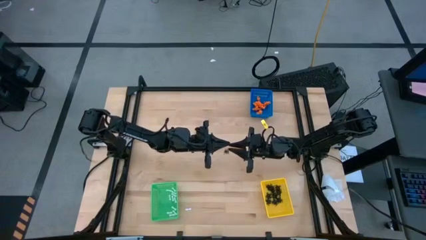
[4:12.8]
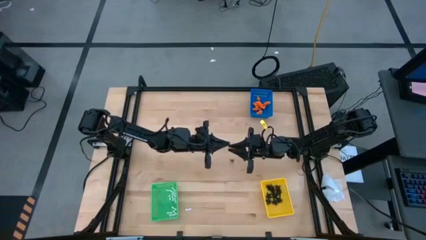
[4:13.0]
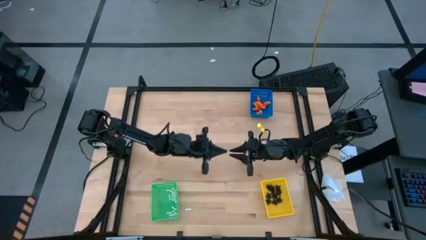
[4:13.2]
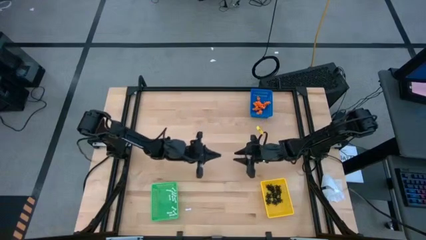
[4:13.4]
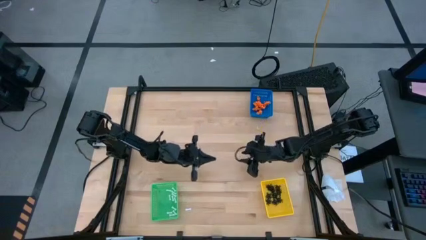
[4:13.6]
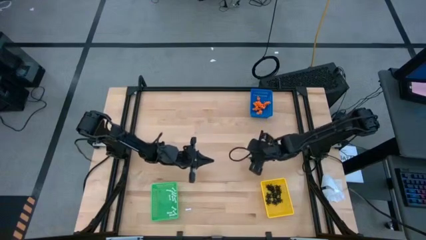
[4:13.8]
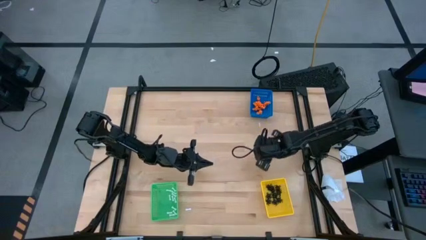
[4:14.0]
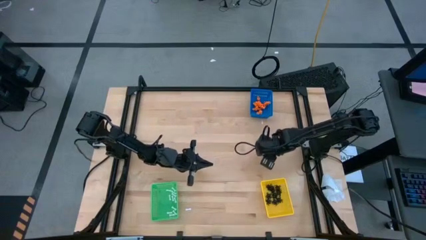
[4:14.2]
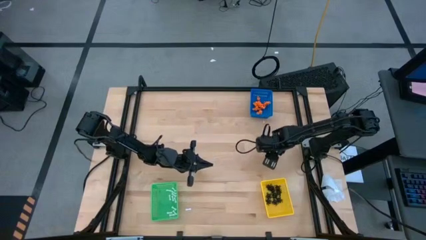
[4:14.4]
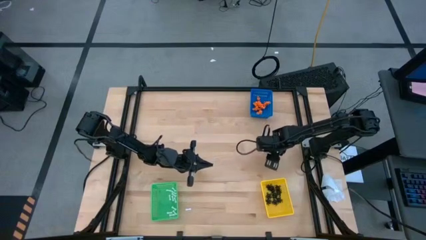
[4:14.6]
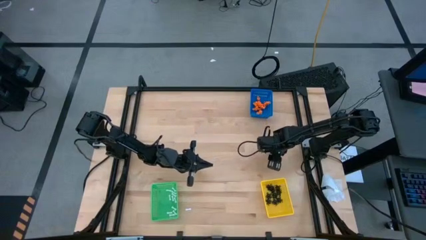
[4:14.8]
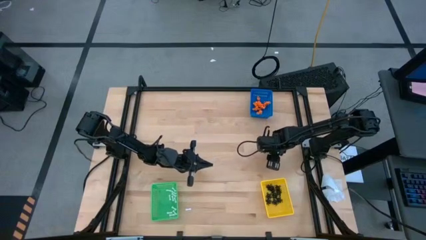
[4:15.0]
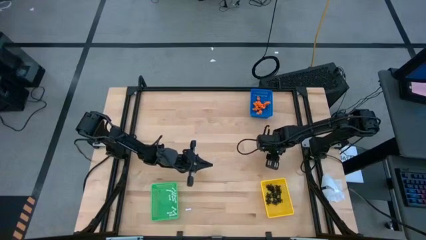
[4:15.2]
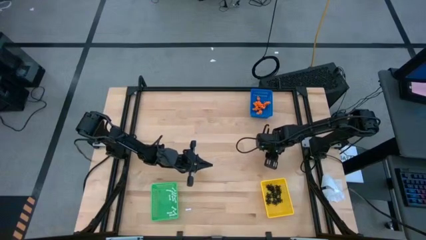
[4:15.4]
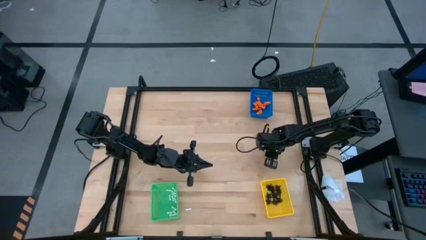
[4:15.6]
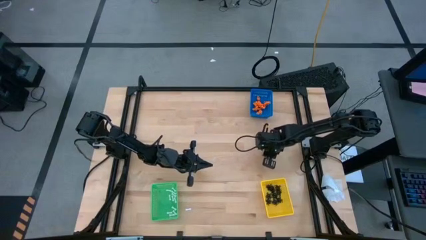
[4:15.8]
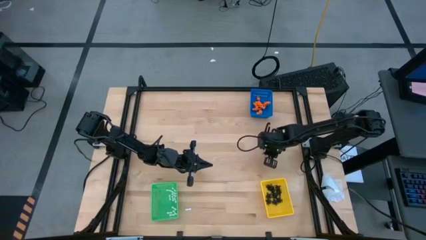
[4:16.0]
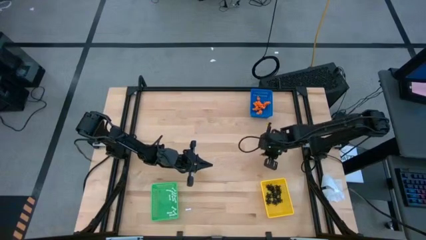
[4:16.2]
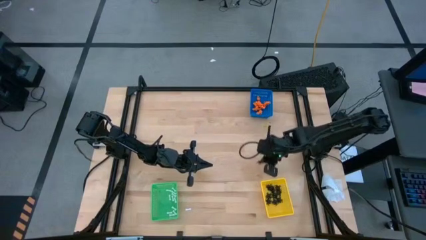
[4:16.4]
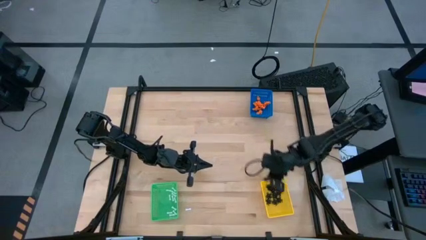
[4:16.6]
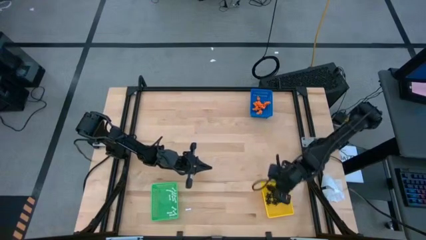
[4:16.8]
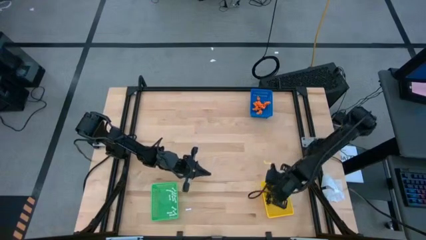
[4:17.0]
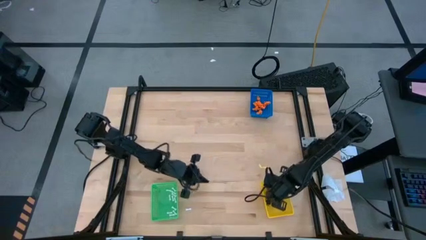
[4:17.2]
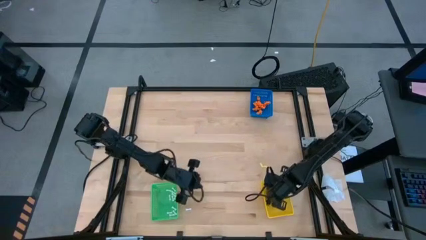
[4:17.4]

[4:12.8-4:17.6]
Task: Sort Halloween decoration
Put the black spider toy into the yellow bin

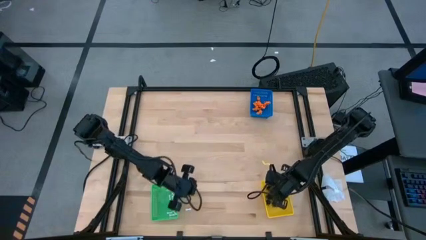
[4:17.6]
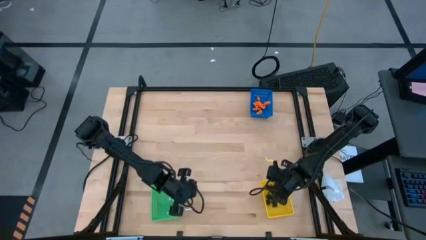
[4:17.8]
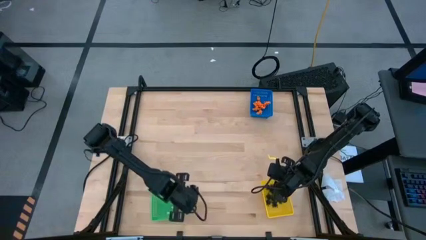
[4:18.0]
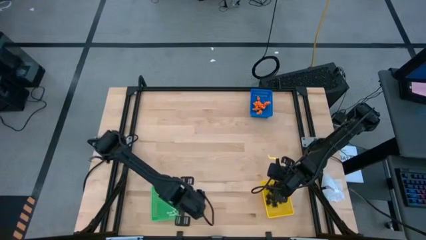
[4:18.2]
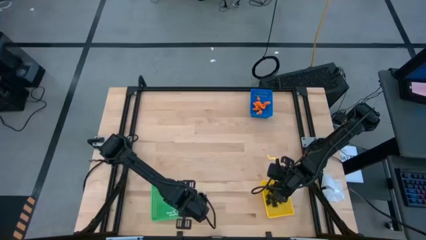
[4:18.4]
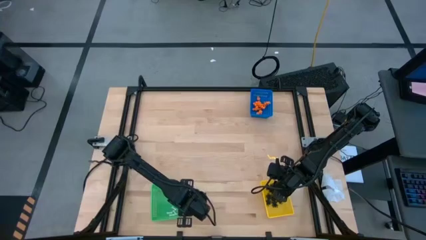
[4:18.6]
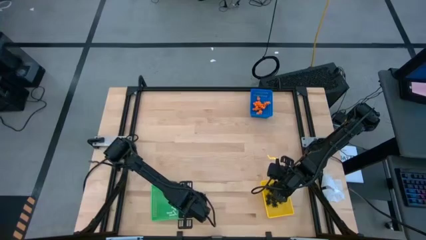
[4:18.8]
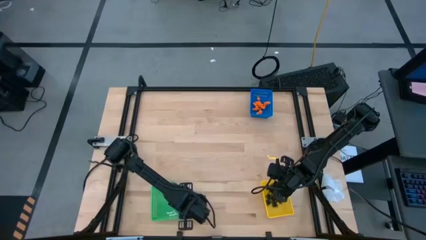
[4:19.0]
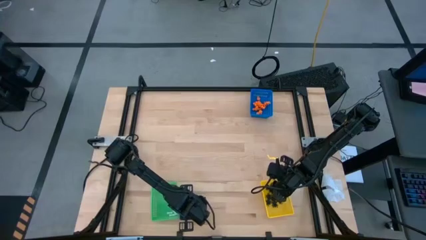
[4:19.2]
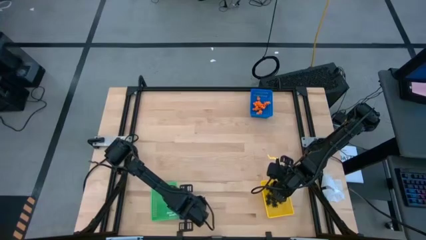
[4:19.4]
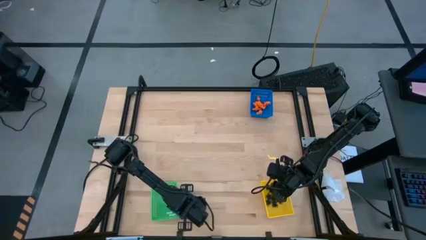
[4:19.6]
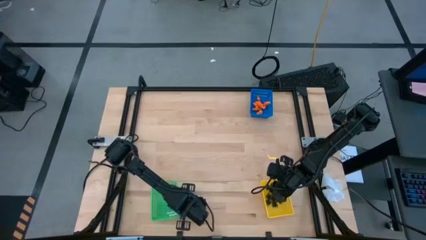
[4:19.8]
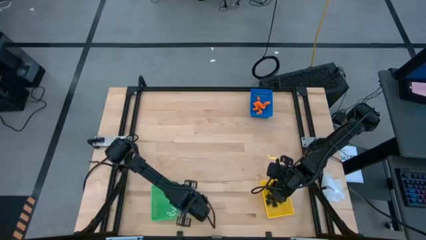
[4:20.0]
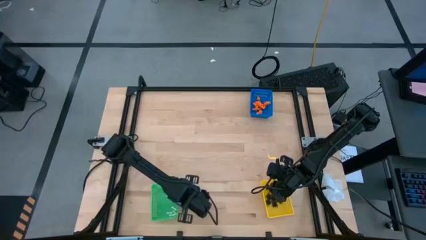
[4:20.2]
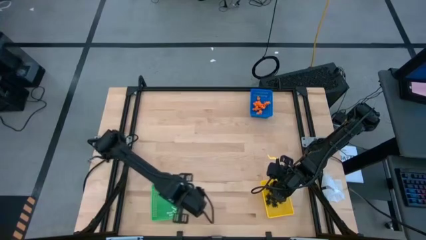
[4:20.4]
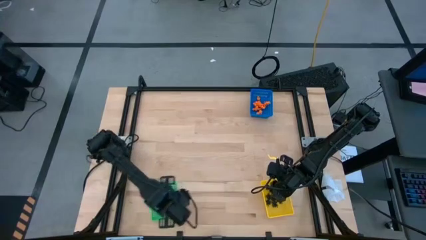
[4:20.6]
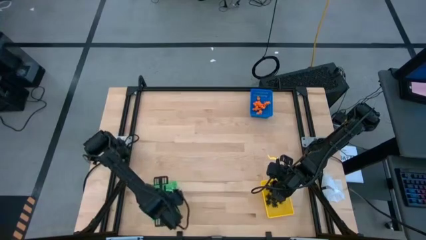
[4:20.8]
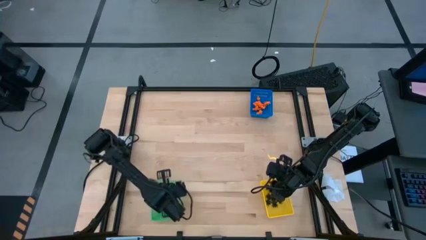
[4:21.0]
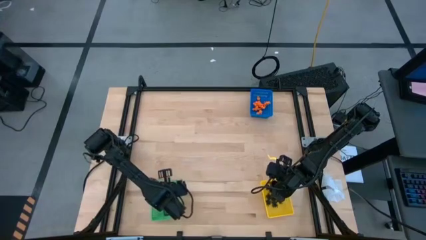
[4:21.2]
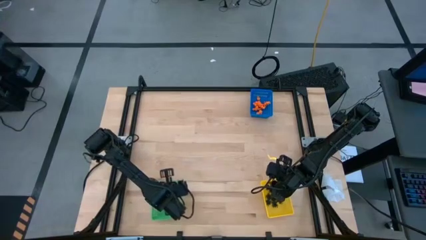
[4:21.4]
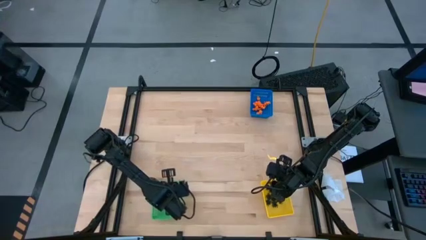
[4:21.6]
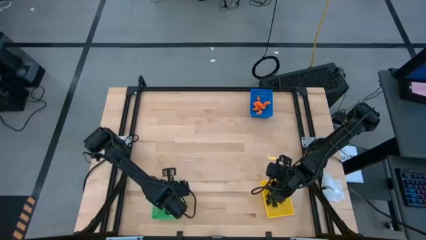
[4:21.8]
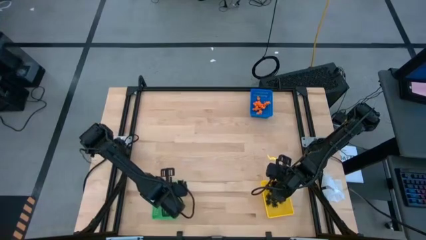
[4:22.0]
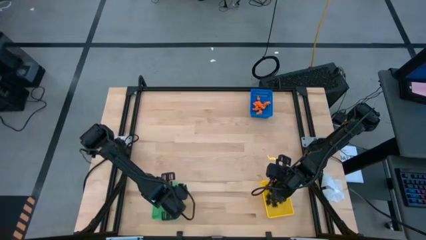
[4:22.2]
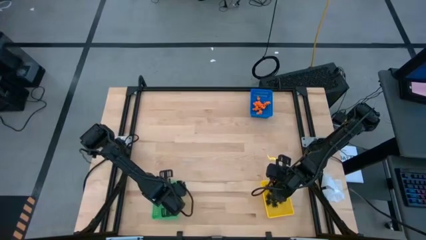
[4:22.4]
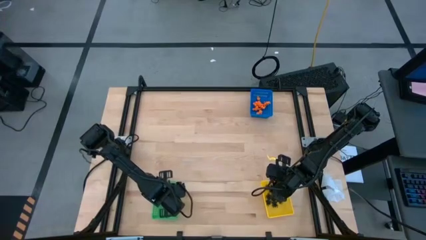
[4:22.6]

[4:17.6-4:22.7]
Put the white bone toy into the green bin

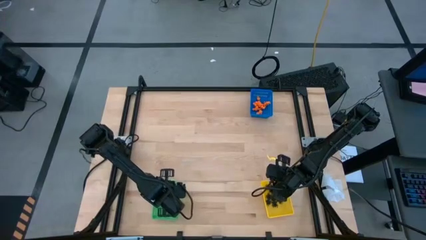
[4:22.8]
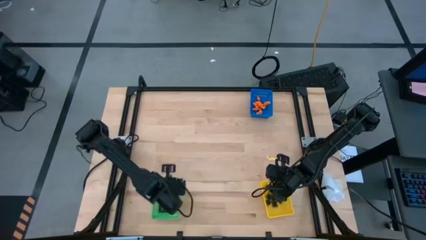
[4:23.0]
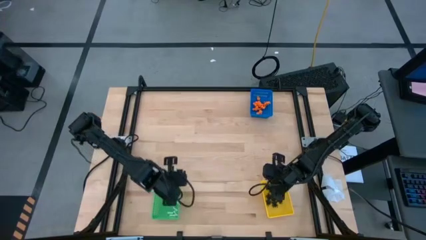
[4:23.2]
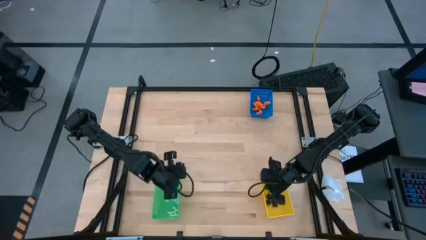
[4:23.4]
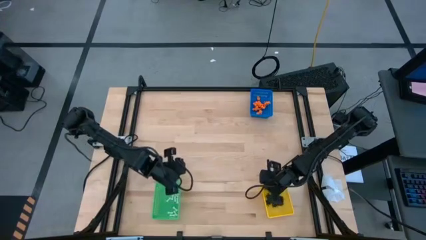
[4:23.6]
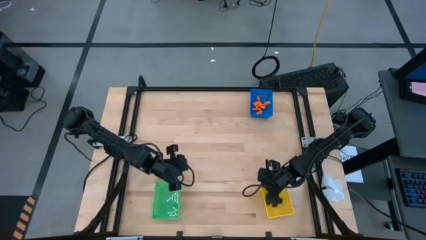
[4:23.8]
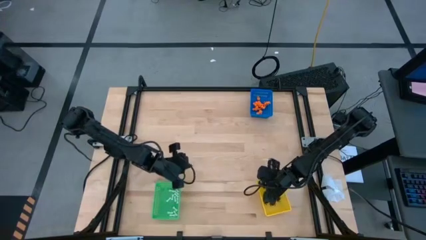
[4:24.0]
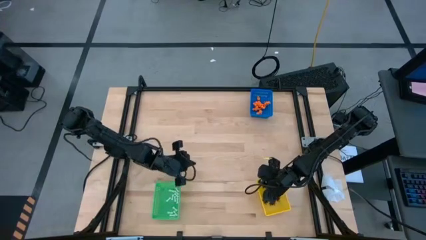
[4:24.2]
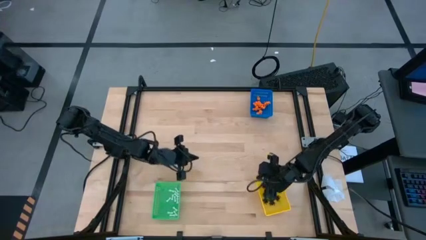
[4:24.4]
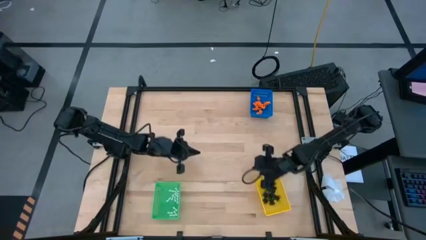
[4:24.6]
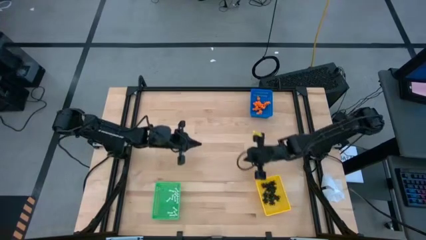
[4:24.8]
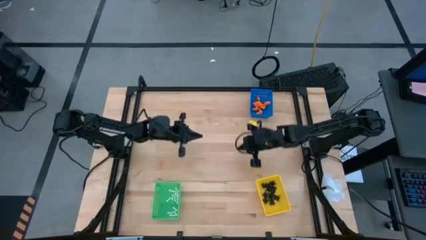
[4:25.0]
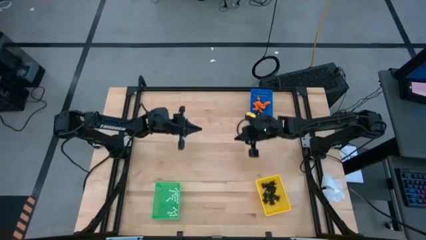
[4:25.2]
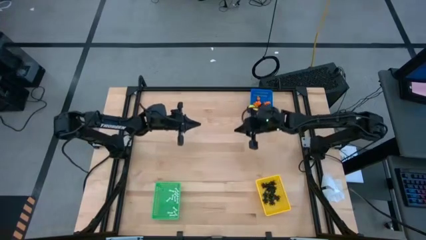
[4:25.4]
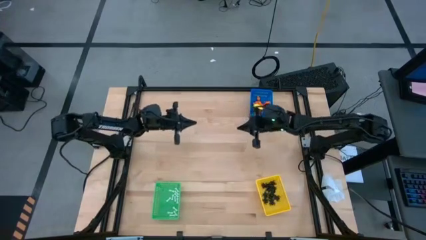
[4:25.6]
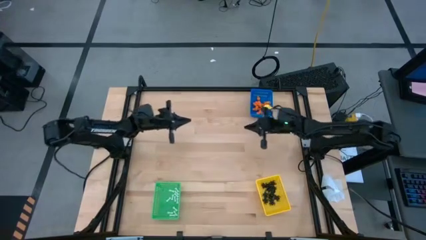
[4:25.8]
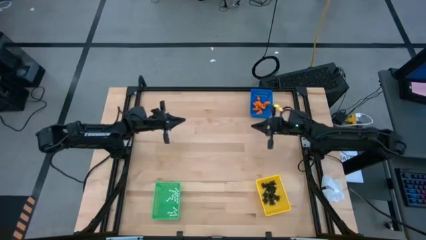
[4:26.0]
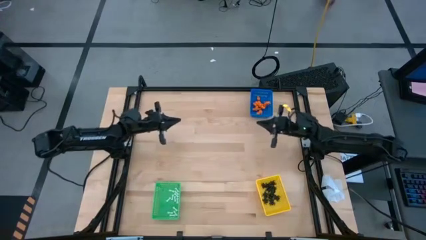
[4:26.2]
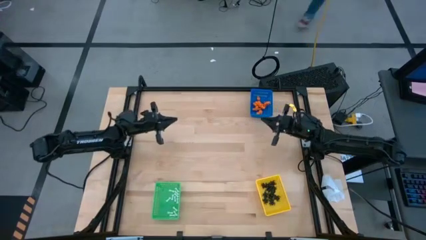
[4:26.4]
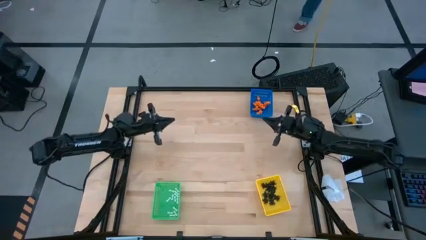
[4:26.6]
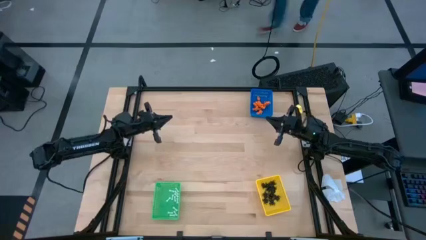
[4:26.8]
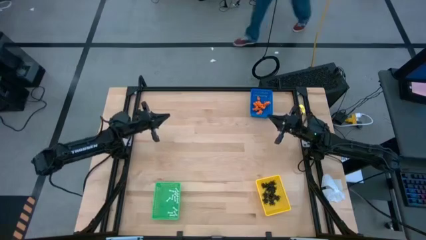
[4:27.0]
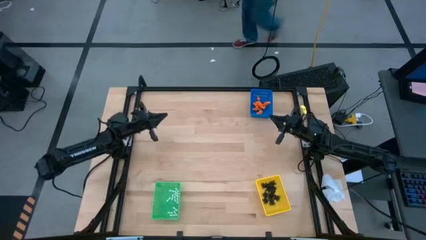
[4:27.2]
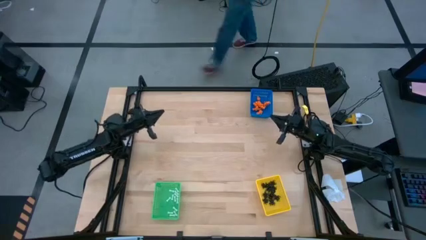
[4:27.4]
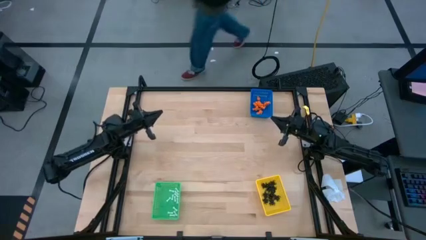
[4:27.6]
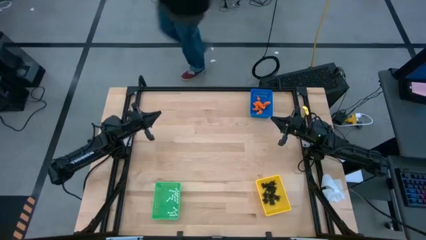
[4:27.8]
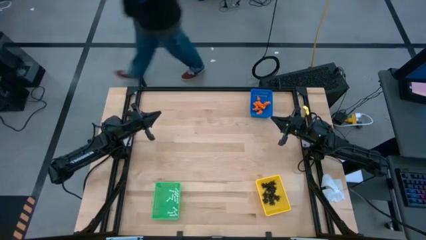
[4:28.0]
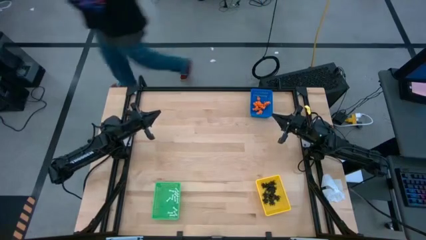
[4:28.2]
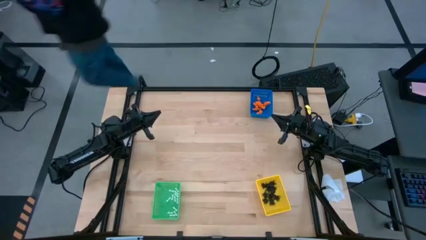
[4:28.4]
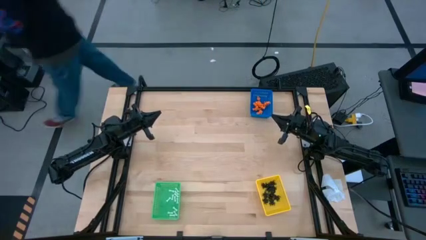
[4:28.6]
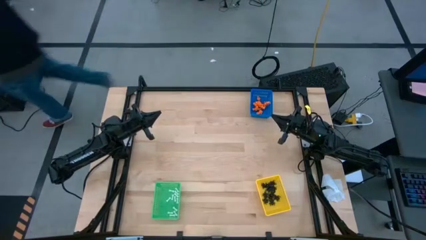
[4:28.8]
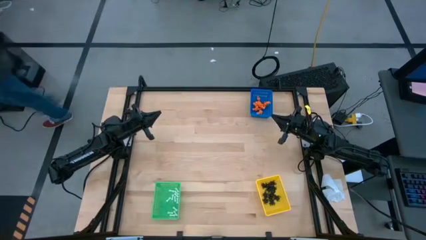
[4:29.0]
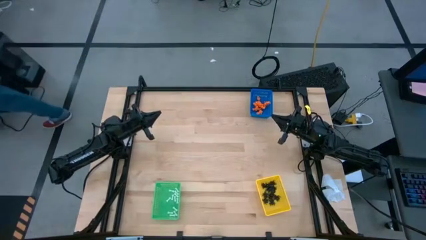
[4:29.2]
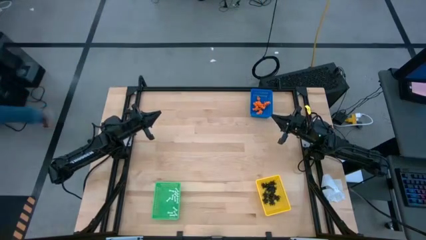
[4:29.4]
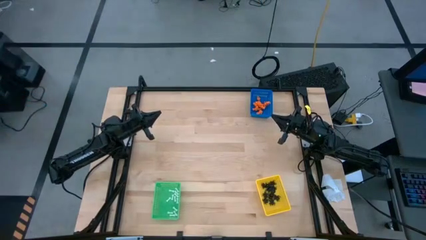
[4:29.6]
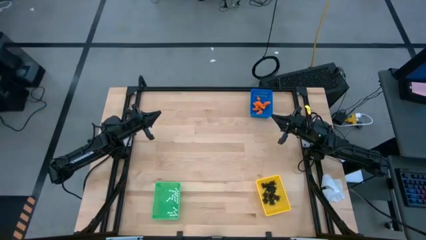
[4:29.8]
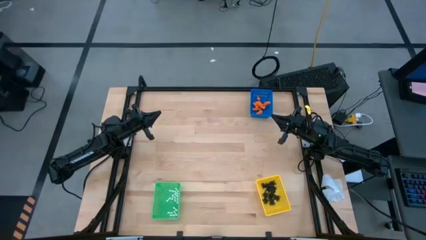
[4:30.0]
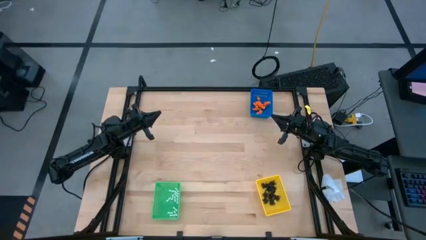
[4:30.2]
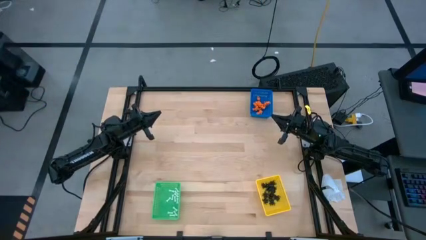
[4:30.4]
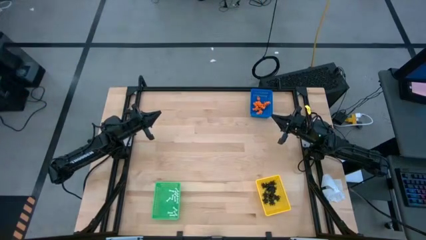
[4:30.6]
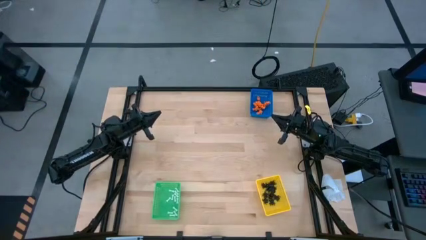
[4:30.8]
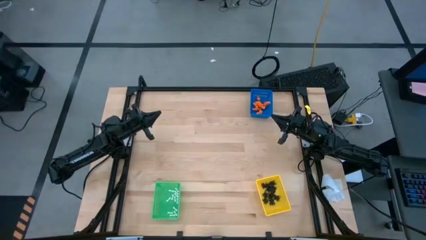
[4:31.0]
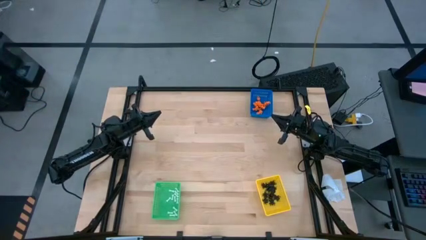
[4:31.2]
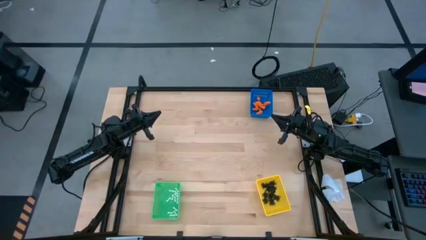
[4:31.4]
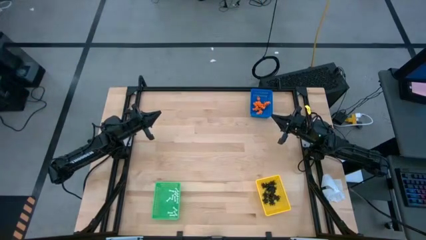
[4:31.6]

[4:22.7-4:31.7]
Return to Home Position
